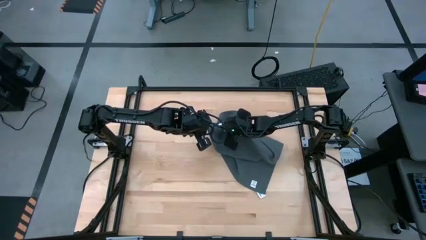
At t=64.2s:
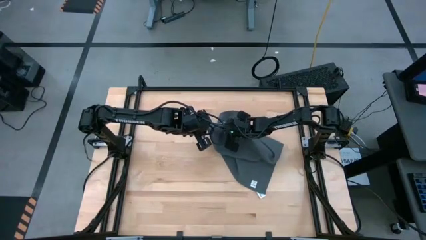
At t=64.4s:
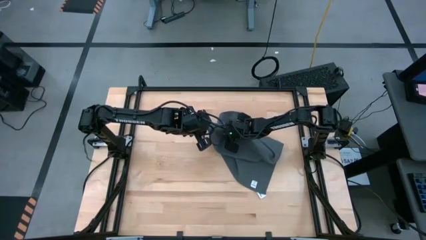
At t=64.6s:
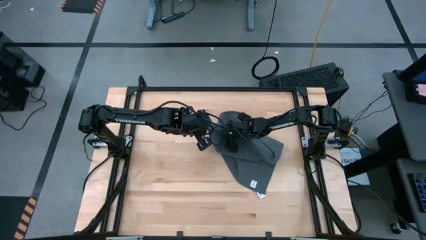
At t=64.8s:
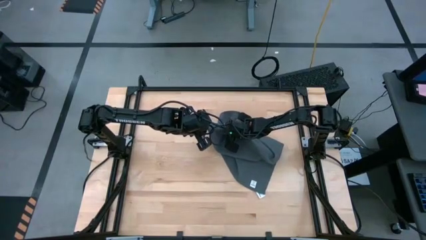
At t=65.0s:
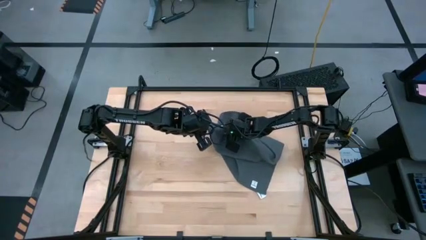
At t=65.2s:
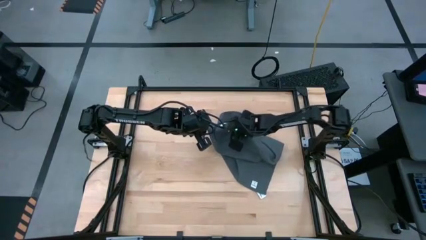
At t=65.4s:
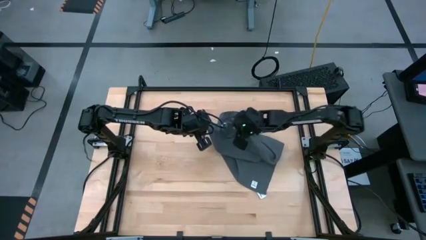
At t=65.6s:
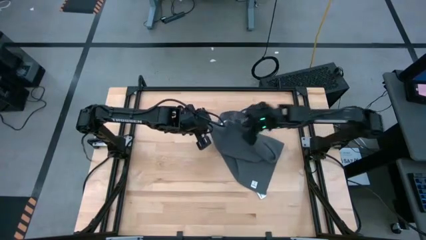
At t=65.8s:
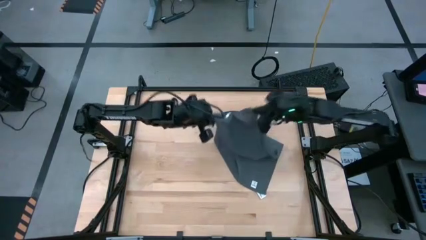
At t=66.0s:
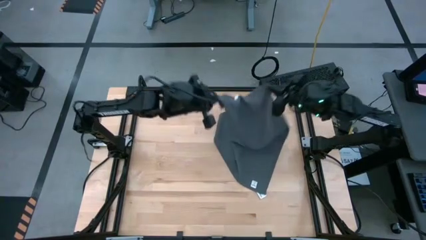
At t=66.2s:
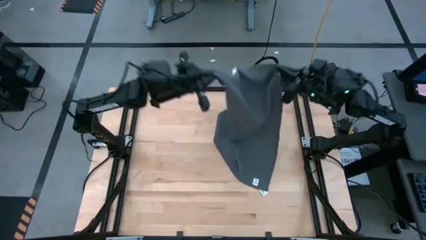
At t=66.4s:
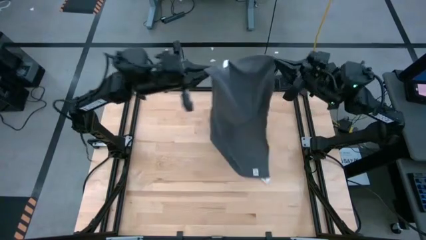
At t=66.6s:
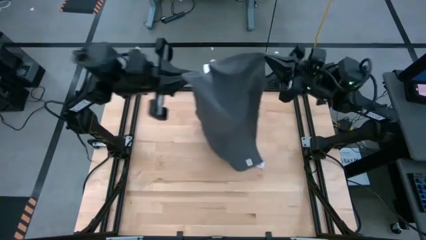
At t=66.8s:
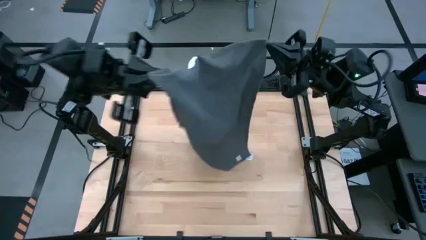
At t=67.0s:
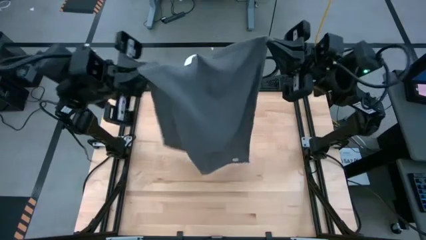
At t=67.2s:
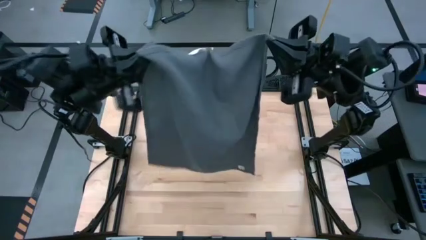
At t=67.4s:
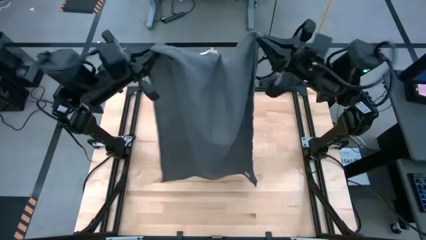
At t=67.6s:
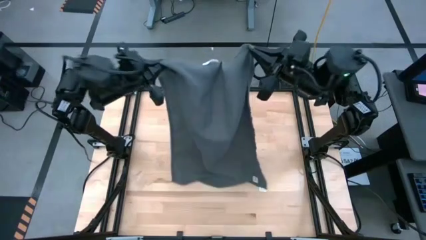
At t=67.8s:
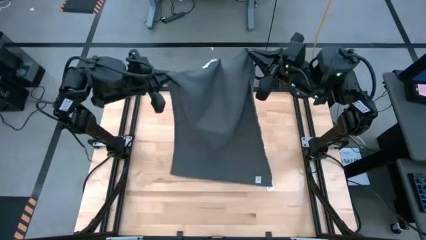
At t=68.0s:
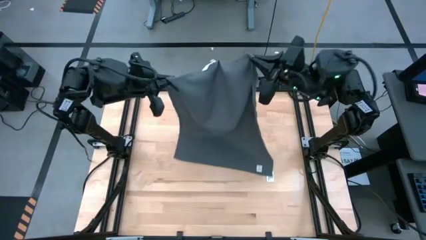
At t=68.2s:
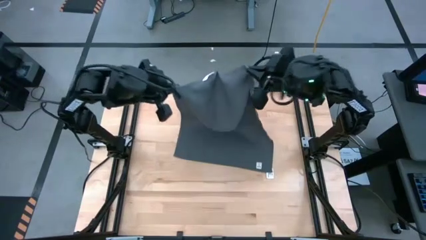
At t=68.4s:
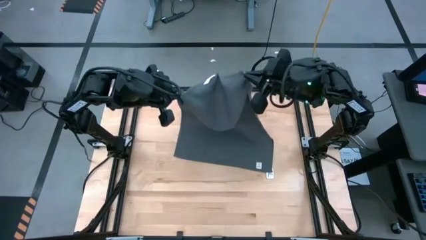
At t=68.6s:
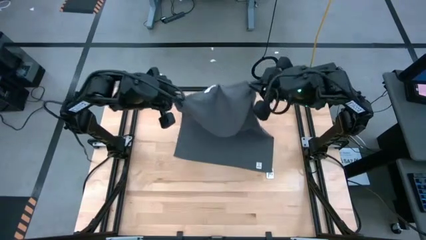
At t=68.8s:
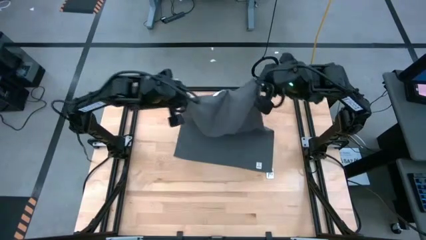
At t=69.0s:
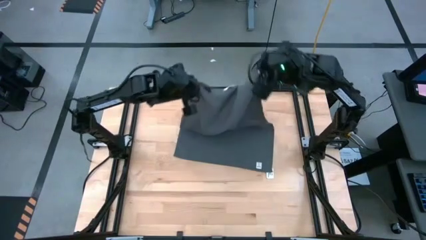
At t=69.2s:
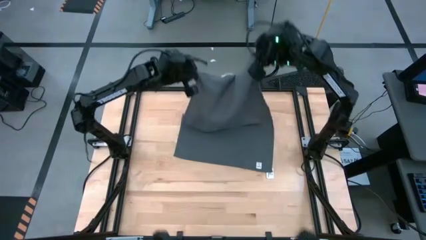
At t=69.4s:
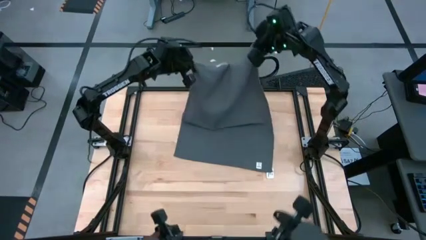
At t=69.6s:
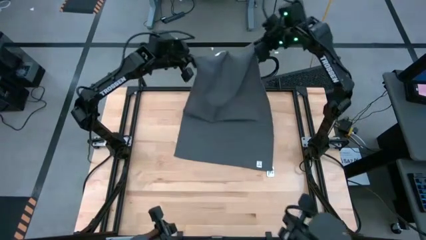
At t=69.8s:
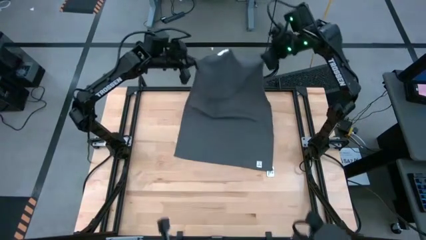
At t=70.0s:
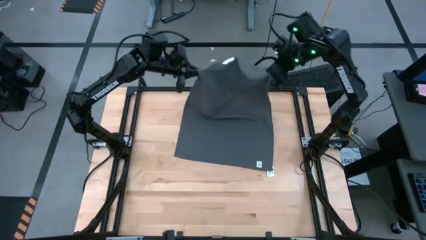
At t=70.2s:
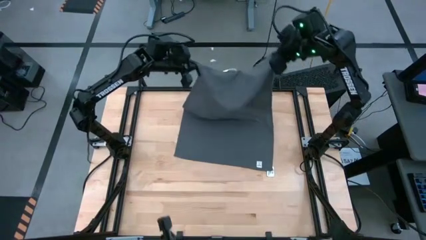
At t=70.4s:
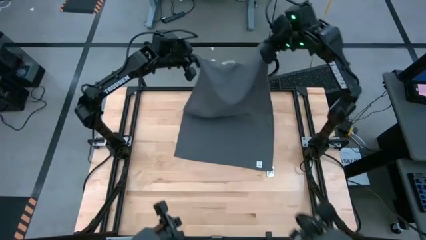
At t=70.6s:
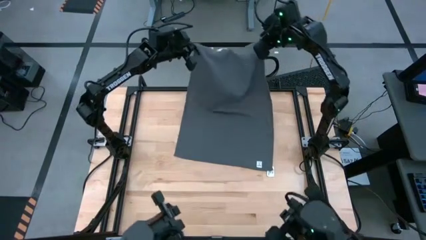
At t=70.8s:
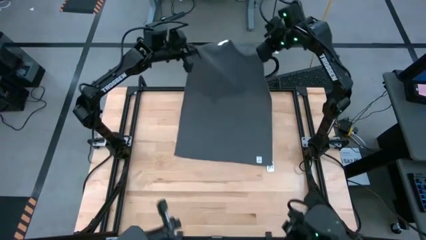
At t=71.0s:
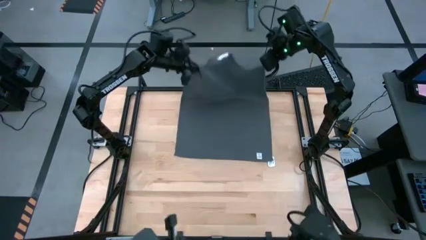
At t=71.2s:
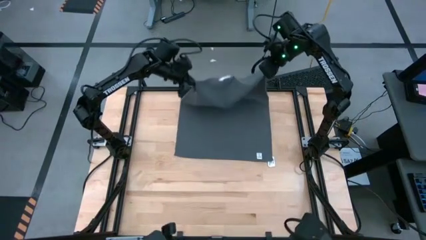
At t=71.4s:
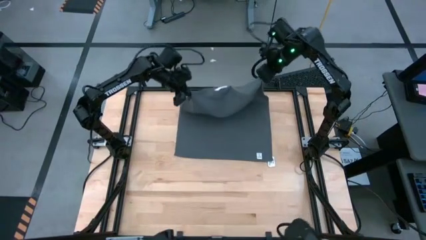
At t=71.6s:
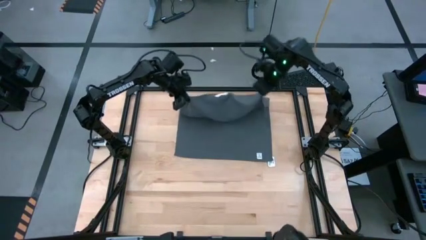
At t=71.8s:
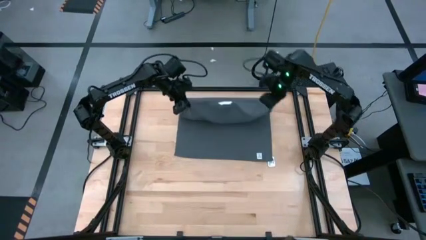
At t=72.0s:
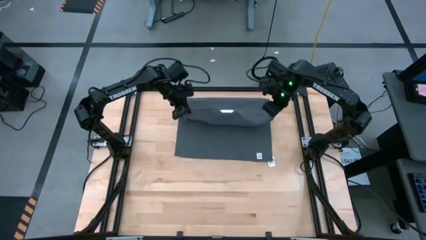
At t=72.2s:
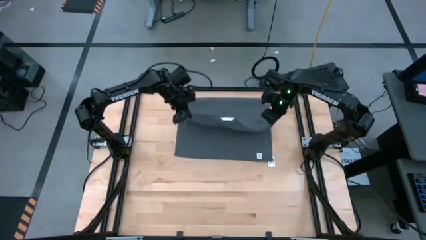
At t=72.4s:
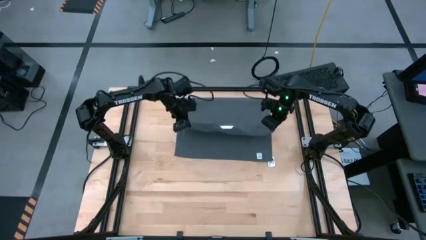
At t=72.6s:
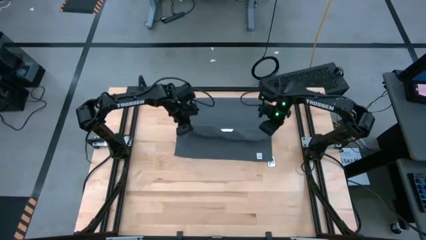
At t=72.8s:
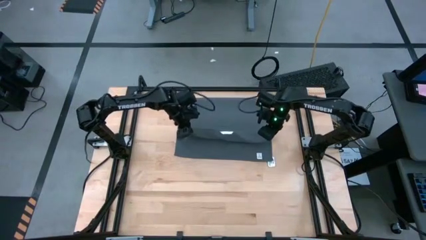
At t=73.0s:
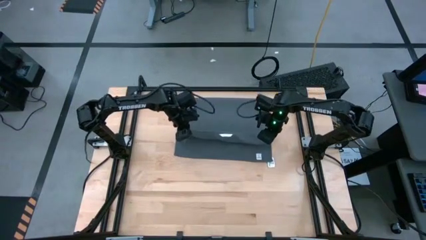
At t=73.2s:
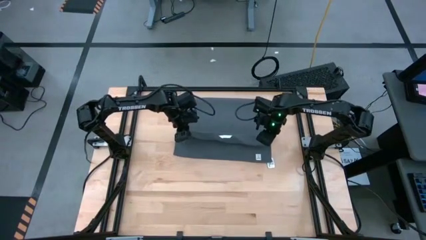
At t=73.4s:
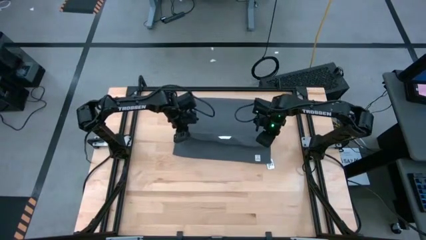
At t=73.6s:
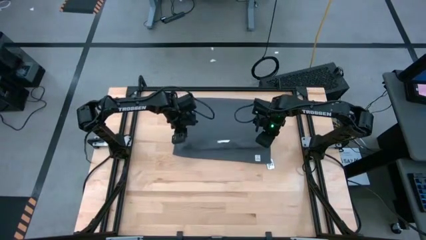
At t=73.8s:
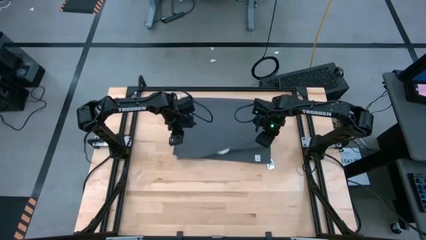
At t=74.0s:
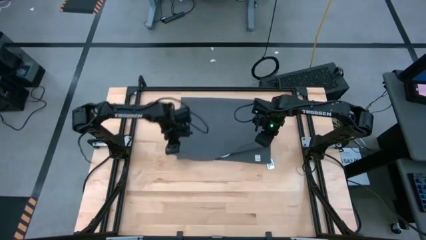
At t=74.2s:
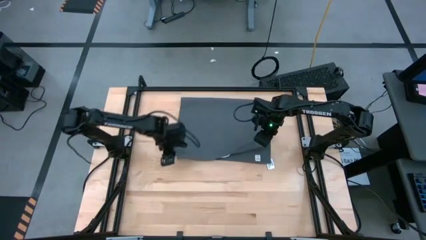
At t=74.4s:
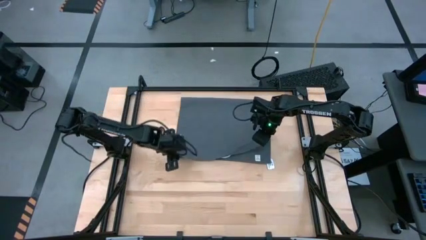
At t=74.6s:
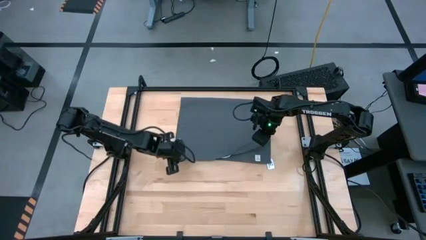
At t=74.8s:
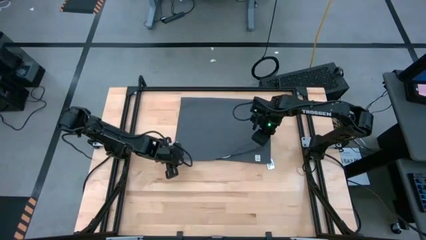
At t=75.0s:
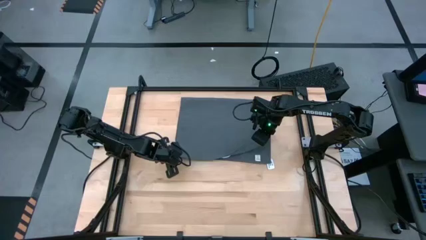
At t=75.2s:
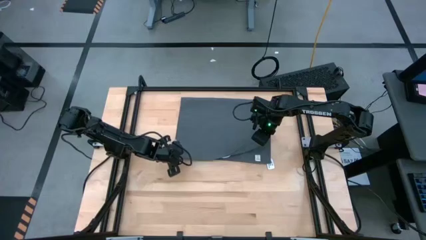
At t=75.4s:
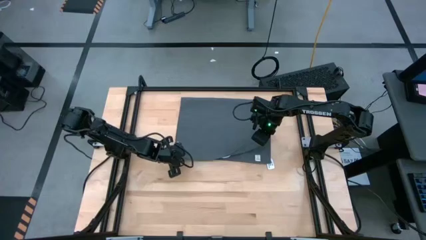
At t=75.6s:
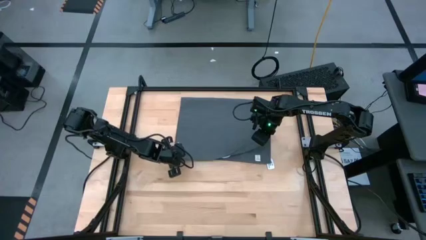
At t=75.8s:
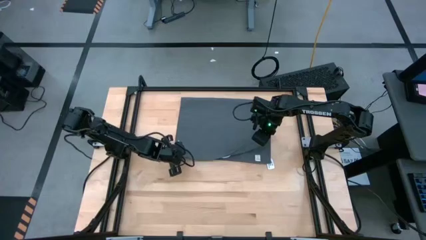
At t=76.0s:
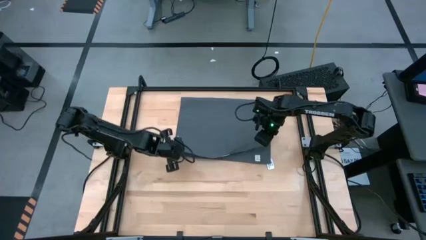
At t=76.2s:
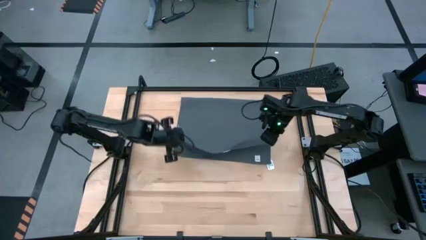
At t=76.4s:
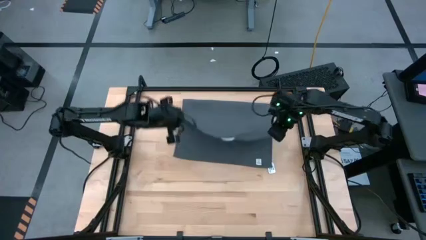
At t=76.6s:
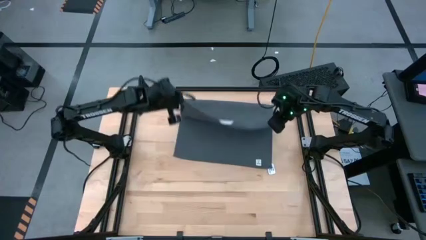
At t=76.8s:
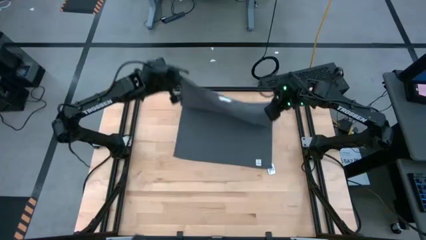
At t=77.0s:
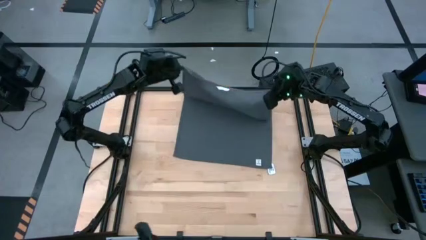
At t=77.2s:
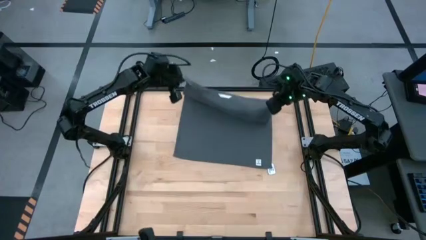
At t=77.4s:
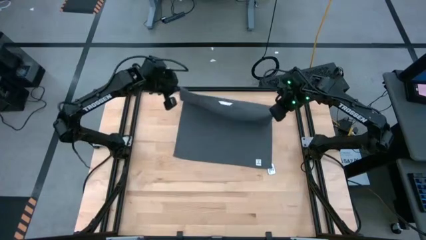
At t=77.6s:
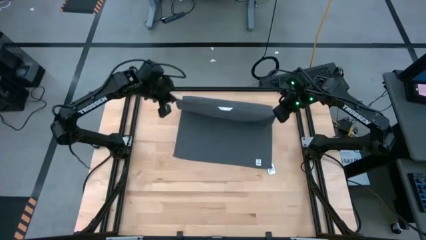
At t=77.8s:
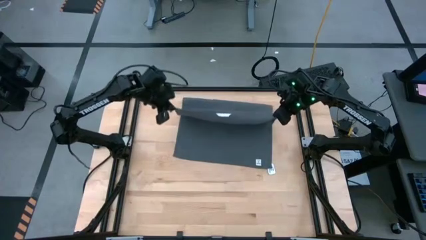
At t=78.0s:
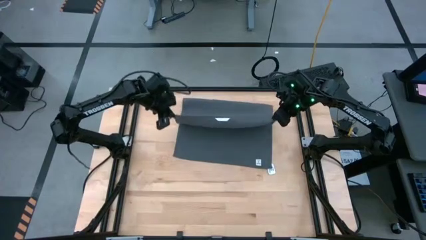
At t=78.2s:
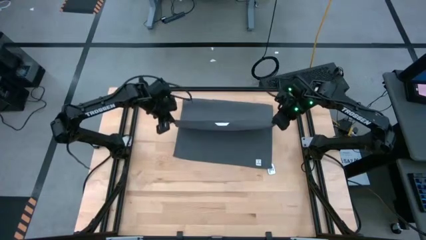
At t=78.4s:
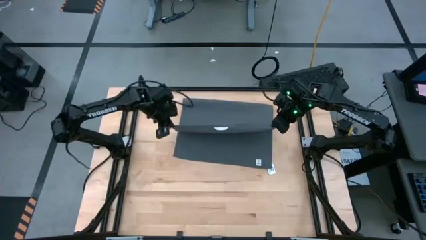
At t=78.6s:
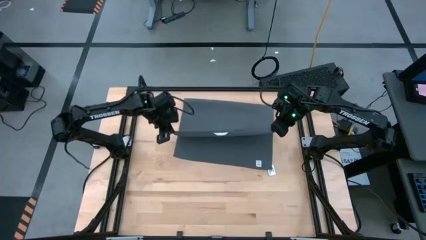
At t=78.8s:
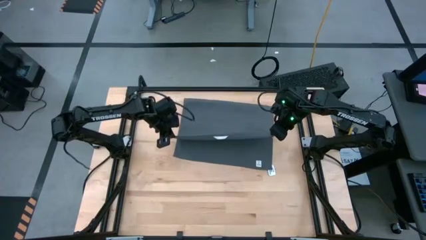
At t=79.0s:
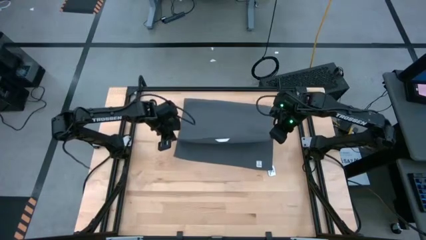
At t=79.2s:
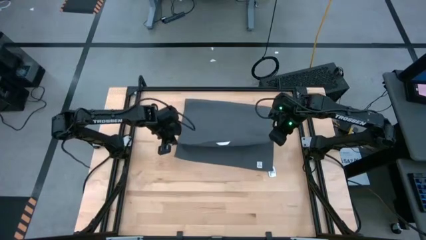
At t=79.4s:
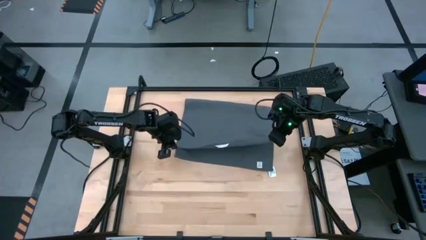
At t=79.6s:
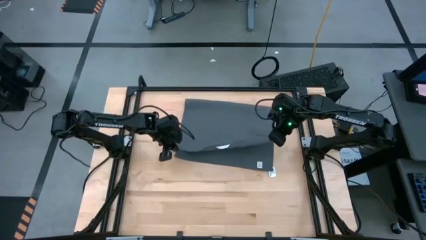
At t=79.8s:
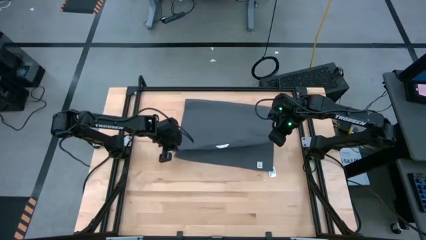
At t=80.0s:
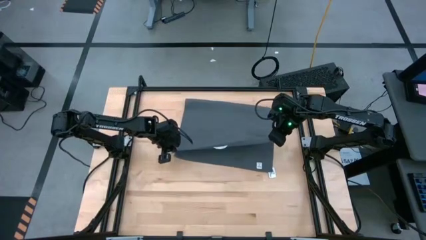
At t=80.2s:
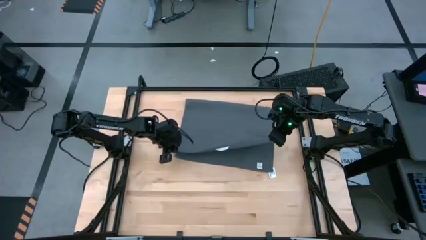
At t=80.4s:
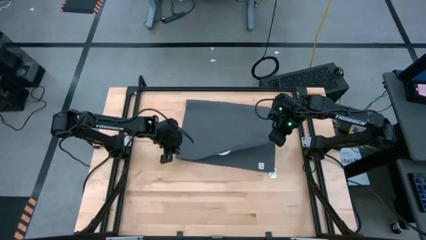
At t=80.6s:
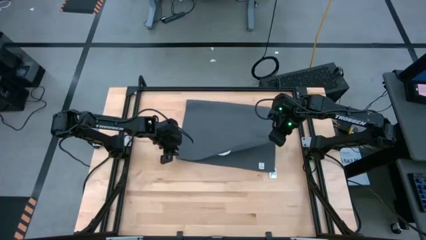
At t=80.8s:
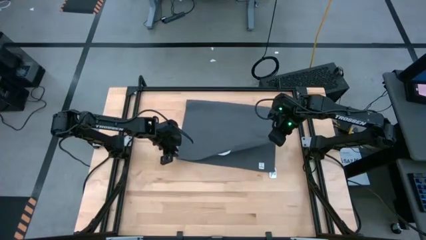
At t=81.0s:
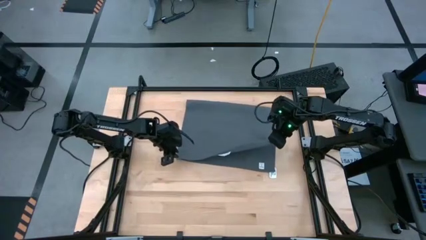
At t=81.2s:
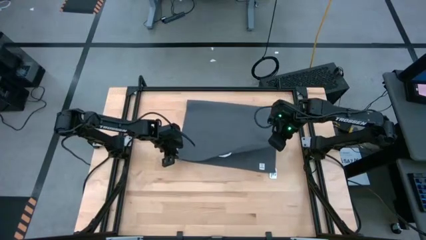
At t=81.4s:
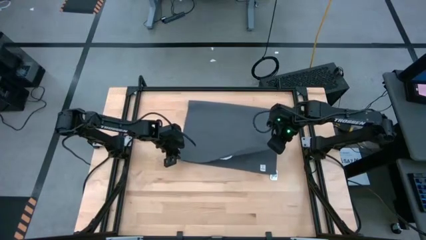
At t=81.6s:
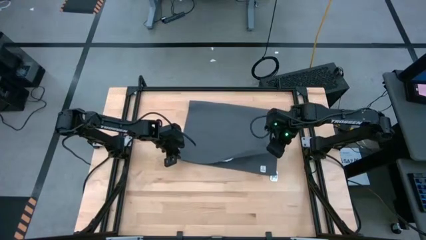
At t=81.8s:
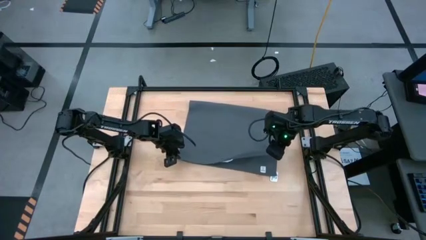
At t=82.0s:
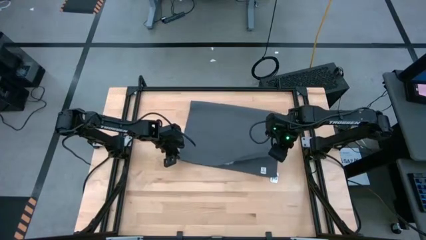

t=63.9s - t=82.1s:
Task: Roll towel
Fold the gray towel on the center of table
